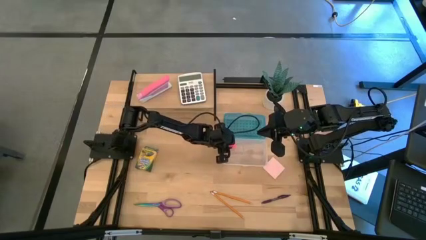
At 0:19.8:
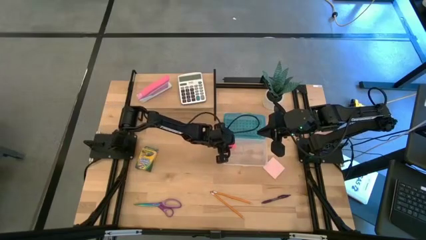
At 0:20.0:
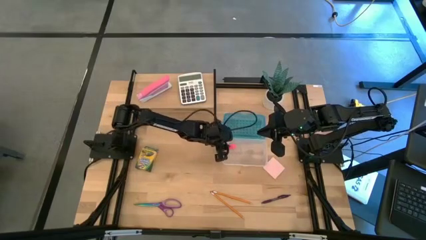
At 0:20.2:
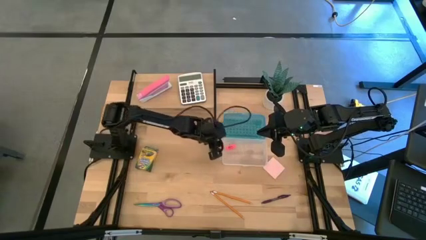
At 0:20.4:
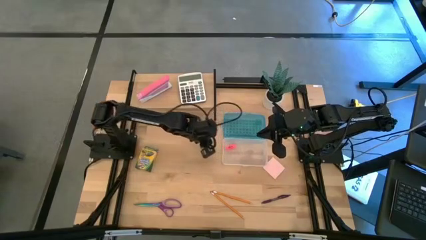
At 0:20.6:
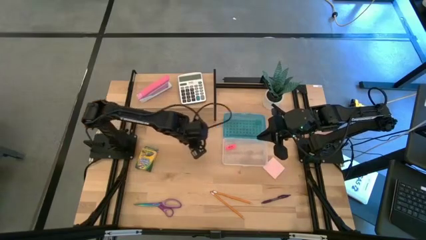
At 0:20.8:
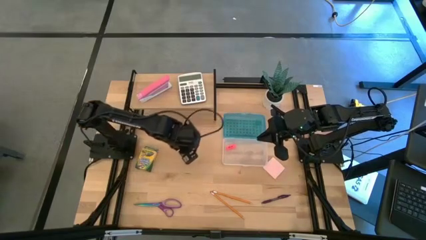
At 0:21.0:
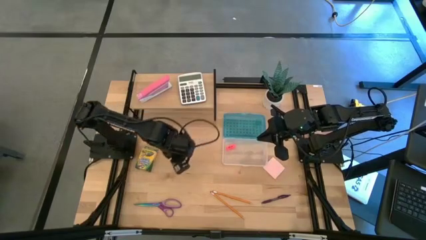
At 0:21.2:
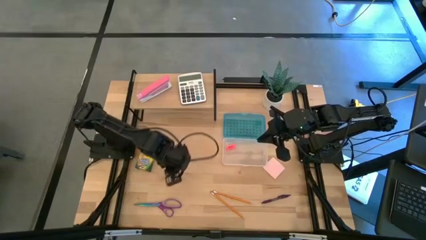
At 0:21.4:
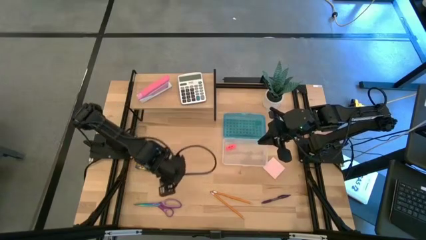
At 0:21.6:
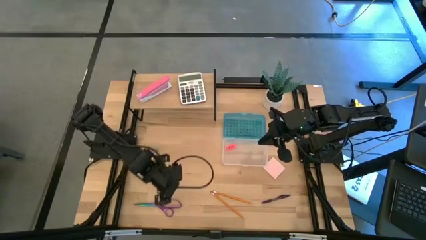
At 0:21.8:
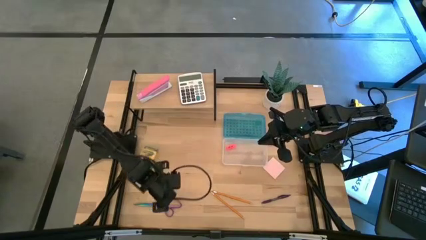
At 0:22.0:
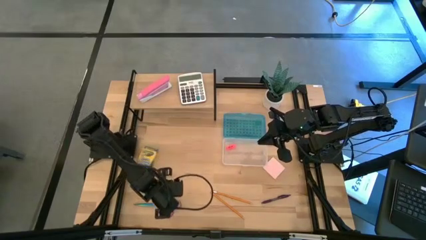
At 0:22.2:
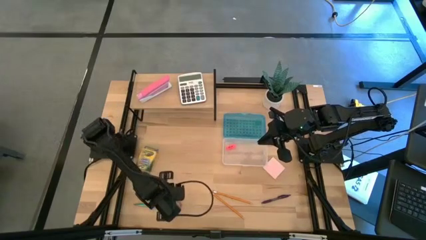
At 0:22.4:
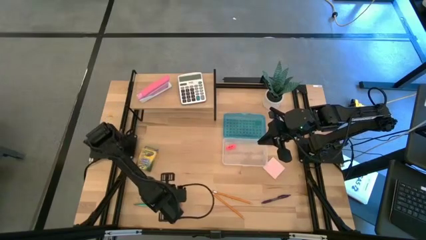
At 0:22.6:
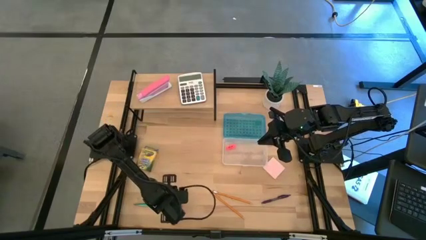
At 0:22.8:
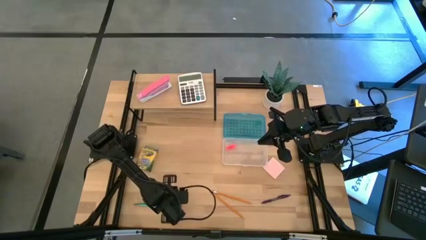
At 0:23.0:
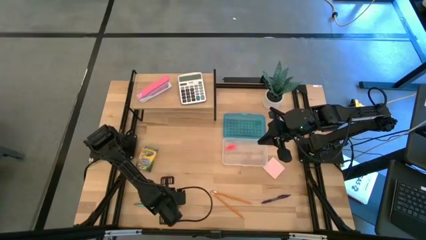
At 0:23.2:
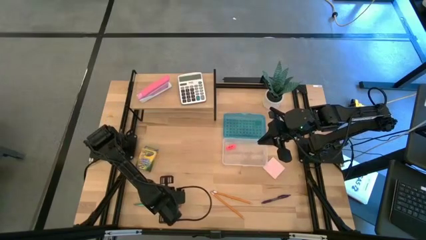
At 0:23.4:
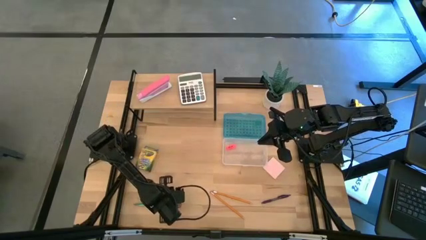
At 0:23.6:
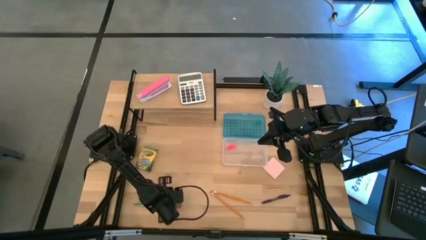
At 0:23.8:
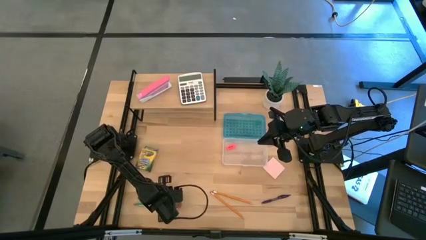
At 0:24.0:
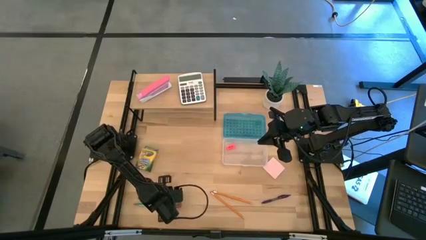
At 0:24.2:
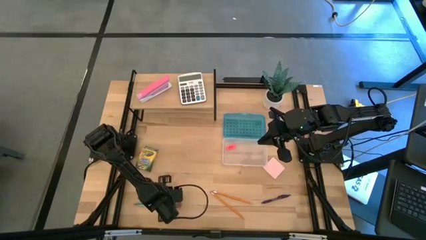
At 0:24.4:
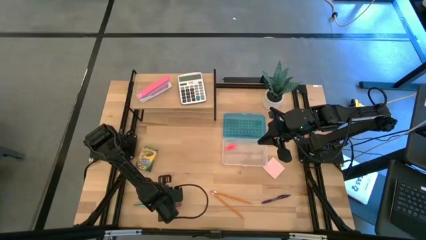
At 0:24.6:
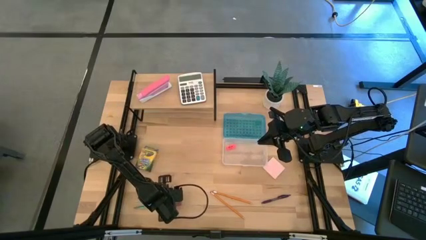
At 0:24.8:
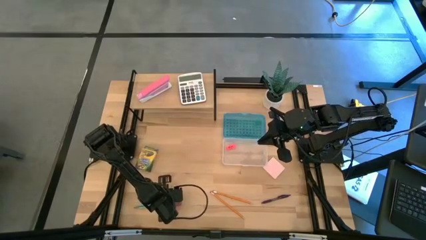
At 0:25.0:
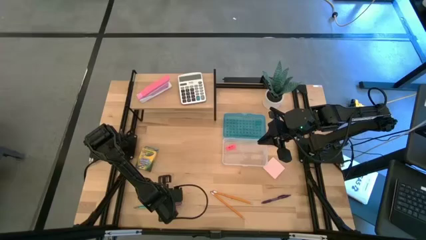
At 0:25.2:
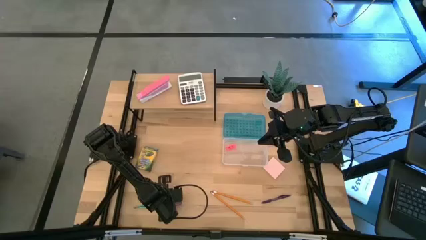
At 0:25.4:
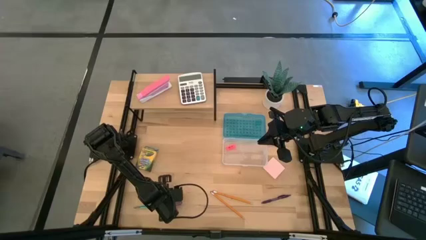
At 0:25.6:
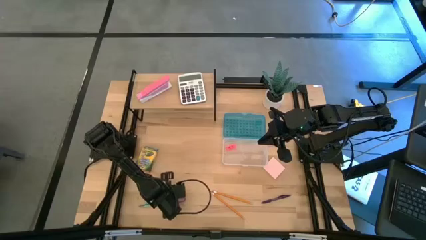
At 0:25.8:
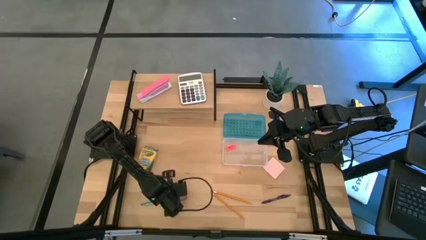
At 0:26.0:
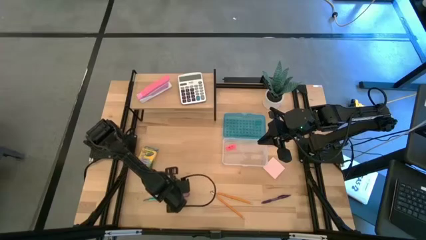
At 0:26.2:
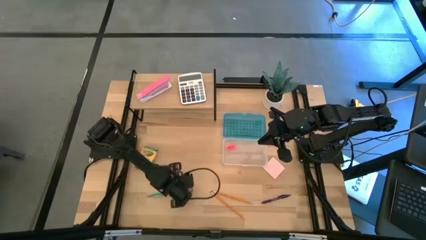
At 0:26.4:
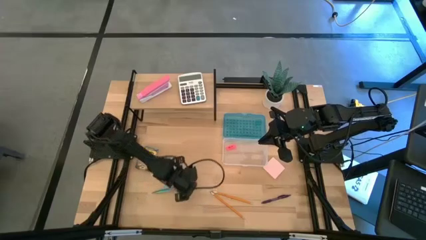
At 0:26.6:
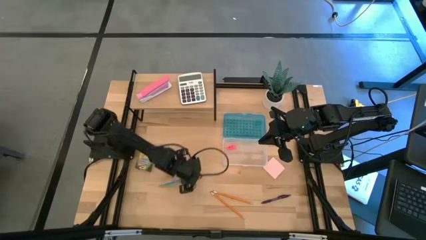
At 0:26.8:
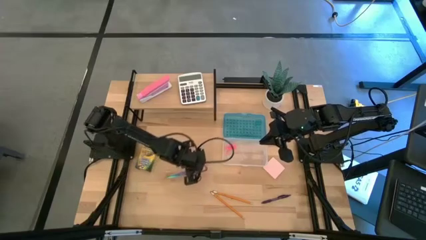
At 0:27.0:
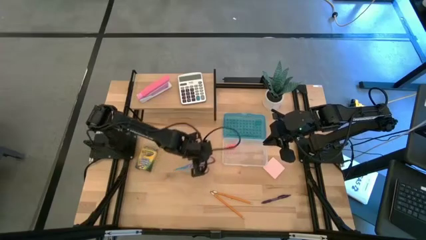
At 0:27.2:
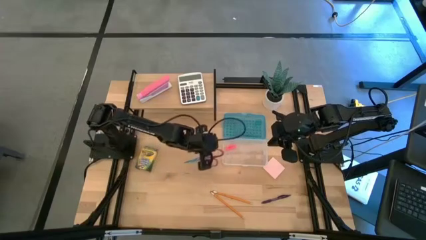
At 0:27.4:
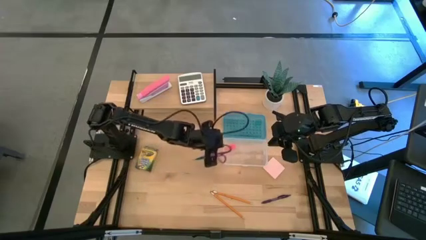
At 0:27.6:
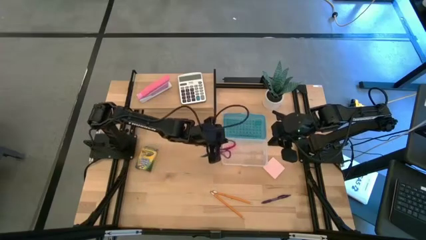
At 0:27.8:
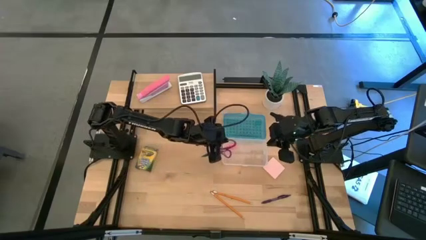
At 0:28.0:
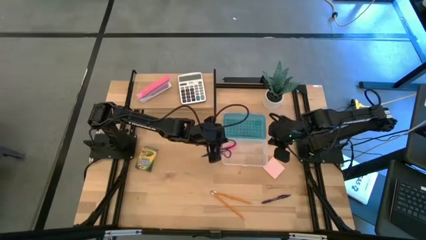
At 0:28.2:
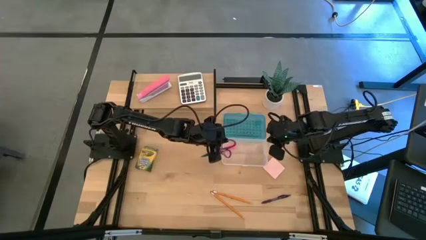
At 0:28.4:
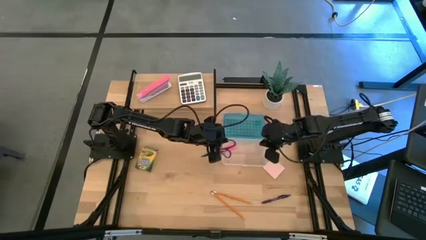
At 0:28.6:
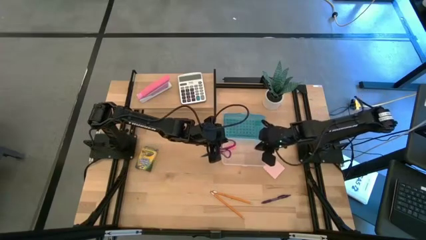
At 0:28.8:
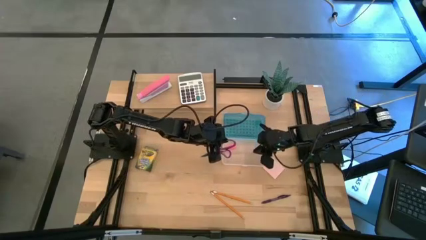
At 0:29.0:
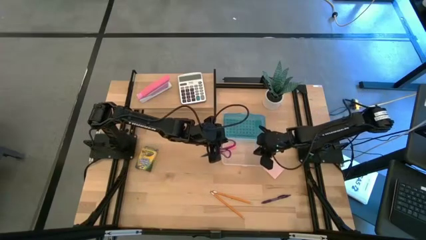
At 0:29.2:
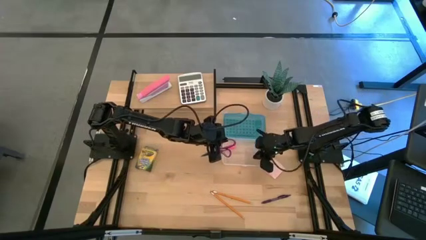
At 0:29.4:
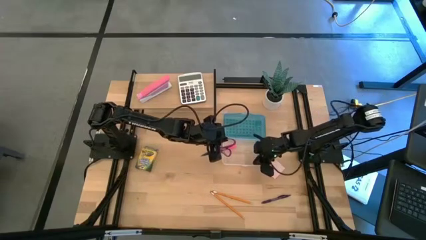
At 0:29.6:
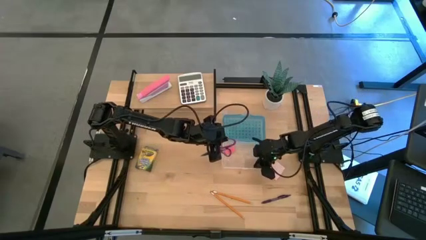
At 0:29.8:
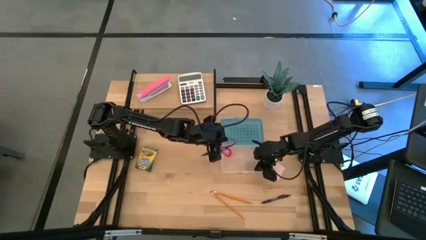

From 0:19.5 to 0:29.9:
Task: Pack school essentials
Put the scissor into the supply box

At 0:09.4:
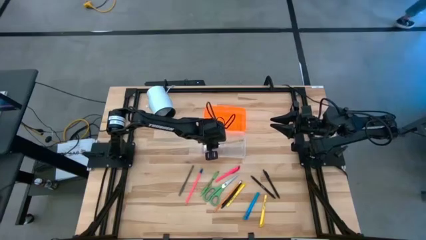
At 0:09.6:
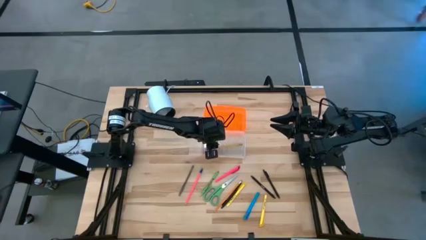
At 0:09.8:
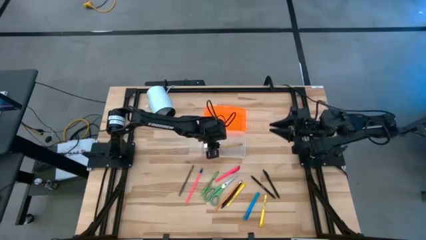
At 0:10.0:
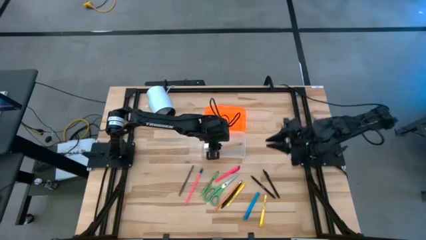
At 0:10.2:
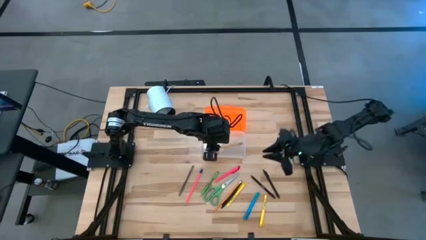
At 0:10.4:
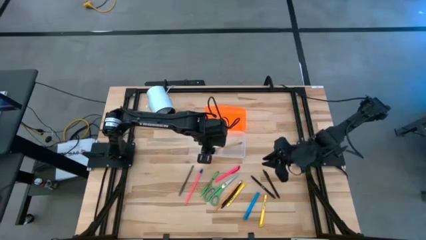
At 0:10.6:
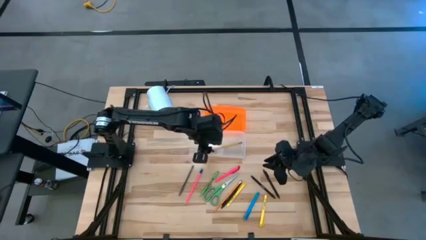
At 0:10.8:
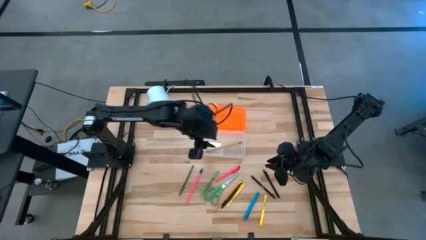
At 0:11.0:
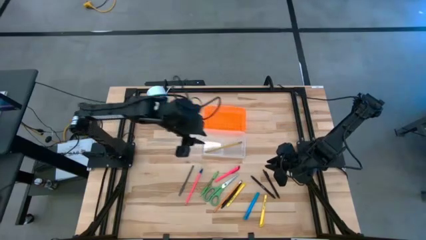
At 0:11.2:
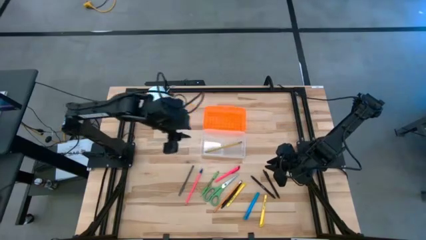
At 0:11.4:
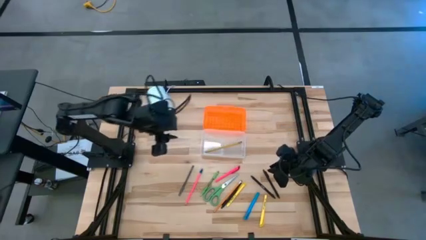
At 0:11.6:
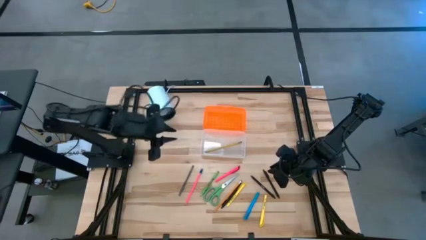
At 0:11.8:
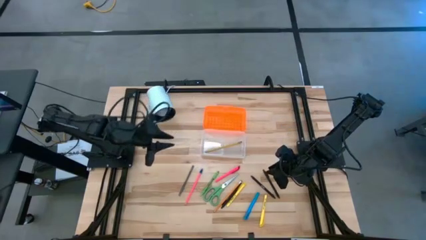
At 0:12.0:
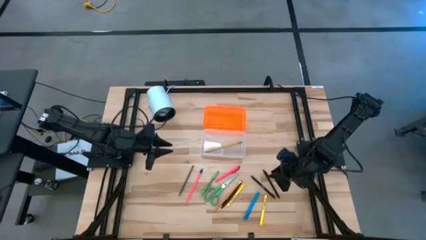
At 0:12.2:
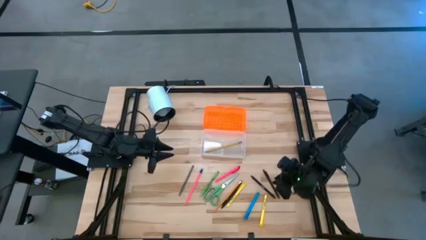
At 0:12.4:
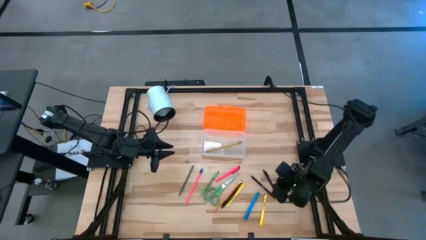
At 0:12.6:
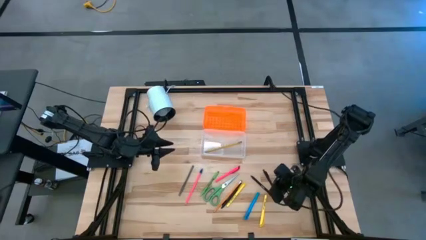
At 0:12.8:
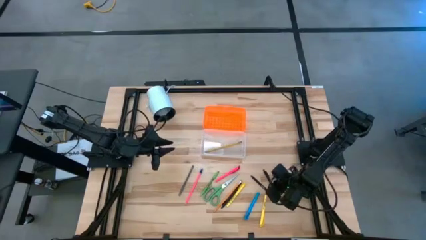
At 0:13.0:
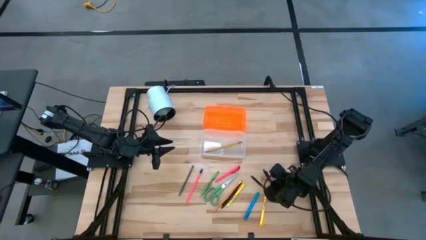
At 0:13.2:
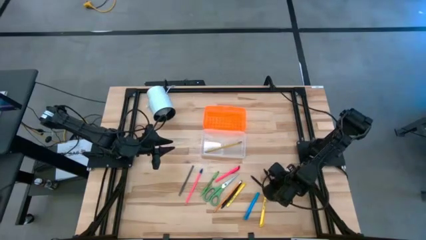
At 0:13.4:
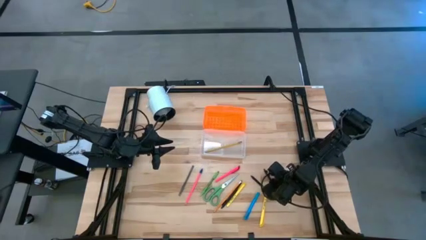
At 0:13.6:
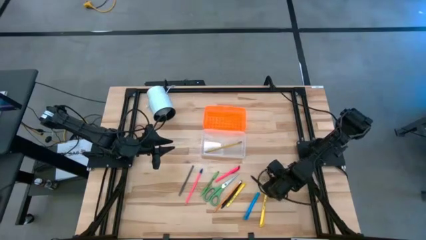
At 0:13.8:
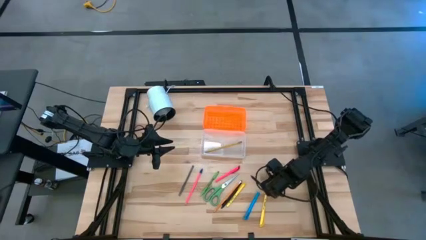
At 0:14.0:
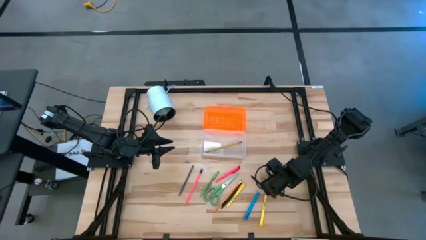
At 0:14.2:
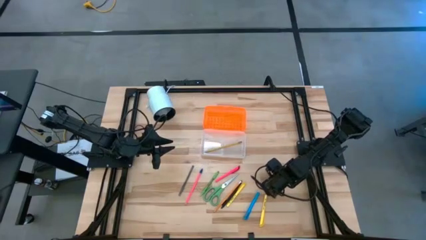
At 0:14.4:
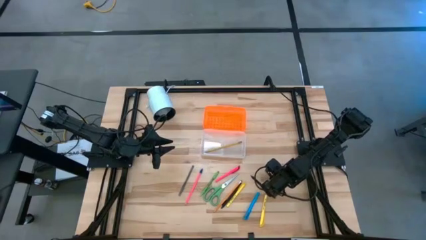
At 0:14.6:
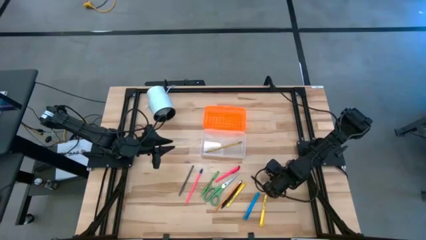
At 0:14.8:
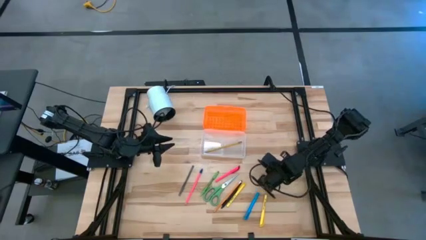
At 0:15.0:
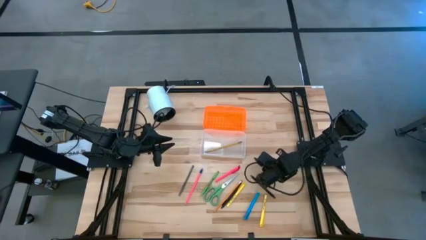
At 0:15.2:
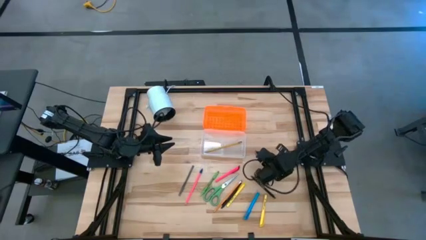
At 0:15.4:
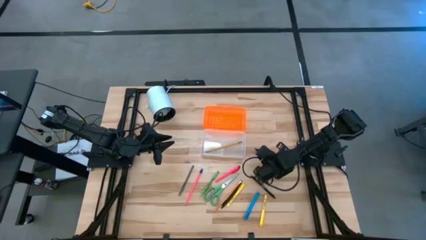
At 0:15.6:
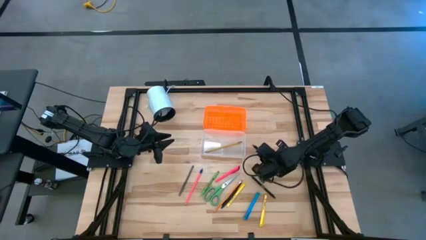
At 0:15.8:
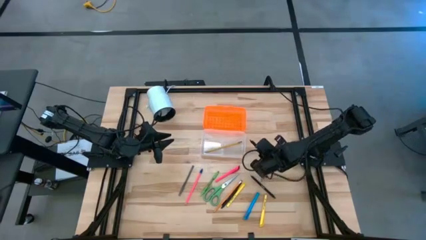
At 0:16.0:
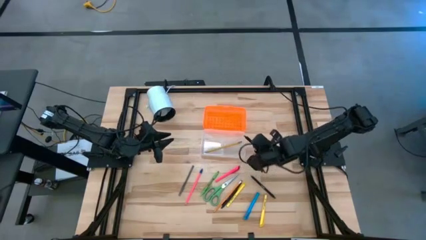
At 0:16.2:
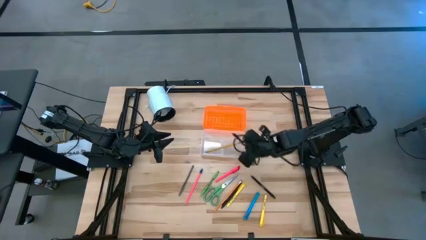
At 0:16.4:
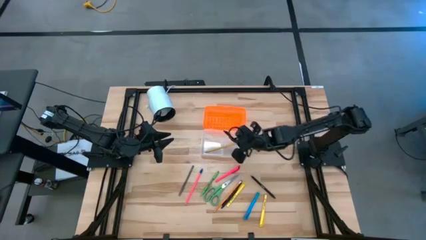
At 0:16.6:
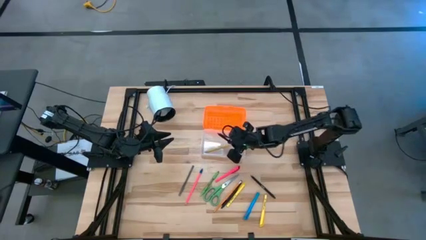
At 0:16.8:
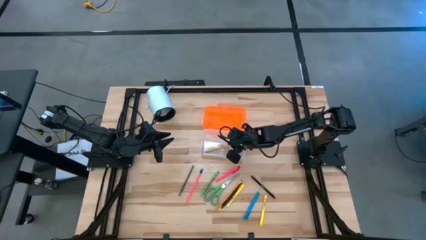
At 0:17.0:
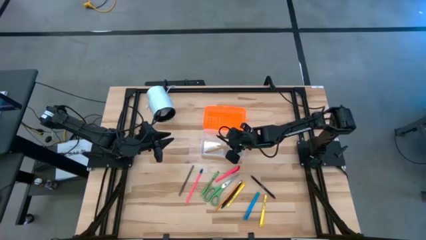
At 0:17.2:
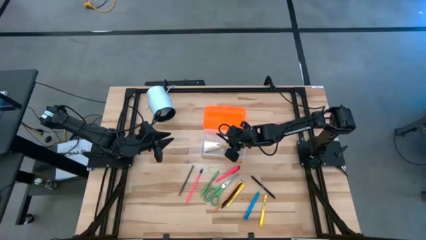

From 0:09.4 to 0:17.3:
Task: Pick & place school supplies into a supply box
Put the right black pen into the orange supply box
